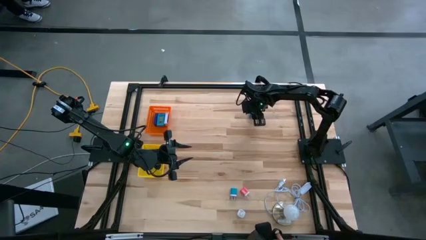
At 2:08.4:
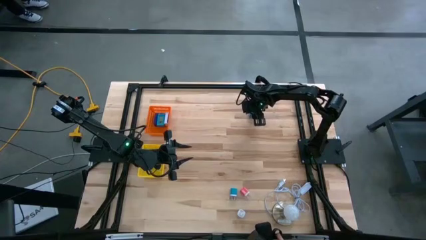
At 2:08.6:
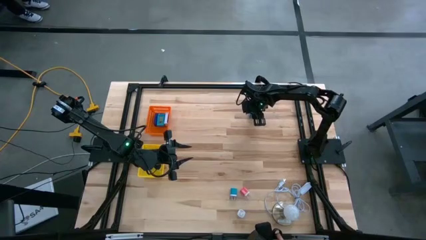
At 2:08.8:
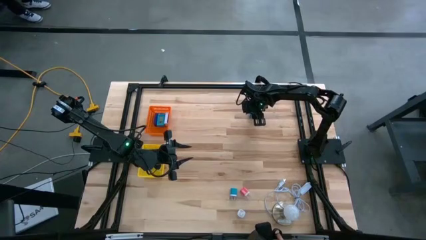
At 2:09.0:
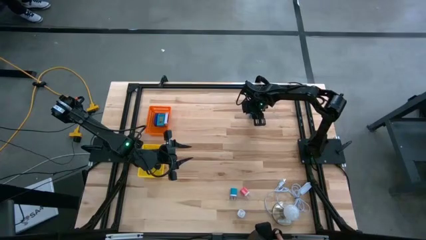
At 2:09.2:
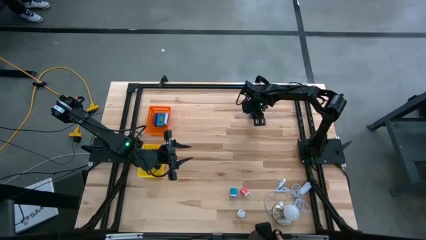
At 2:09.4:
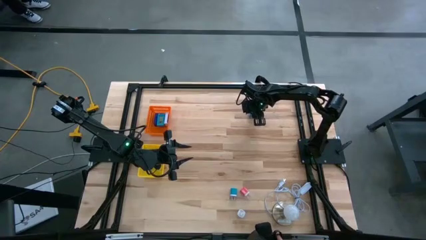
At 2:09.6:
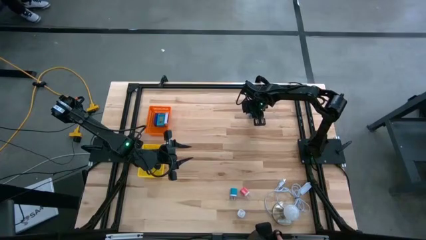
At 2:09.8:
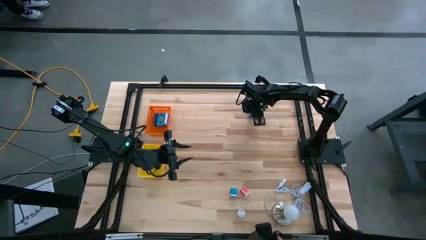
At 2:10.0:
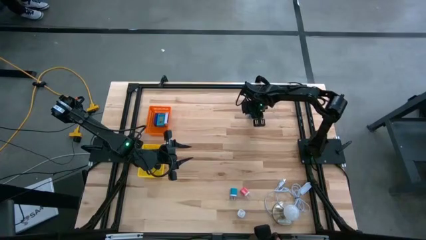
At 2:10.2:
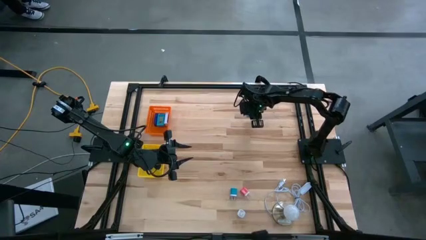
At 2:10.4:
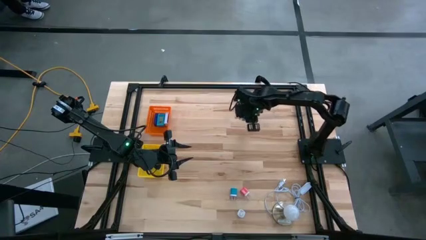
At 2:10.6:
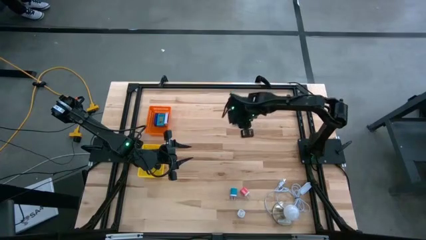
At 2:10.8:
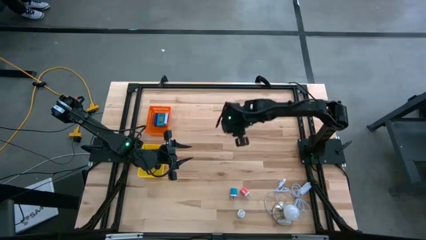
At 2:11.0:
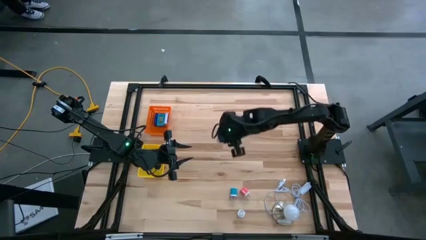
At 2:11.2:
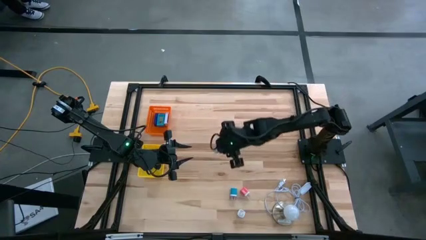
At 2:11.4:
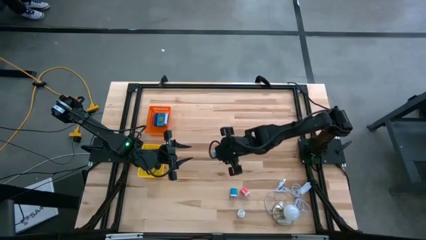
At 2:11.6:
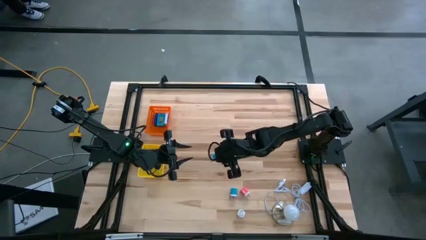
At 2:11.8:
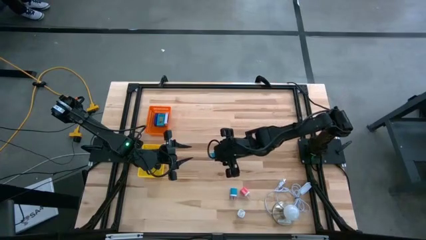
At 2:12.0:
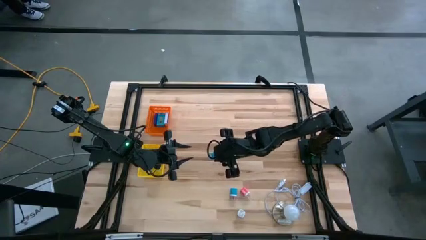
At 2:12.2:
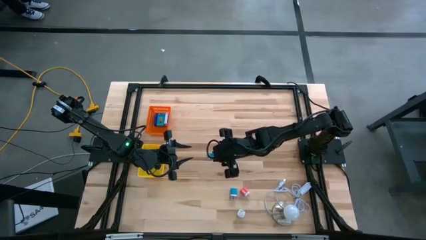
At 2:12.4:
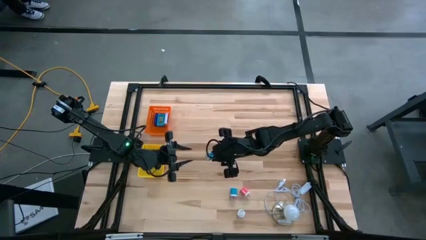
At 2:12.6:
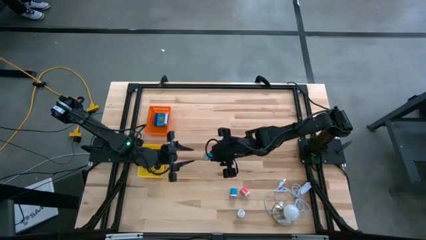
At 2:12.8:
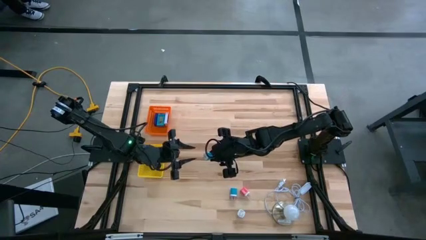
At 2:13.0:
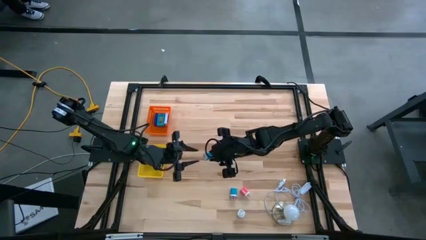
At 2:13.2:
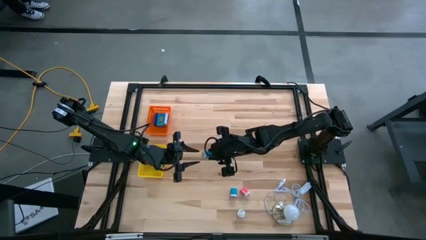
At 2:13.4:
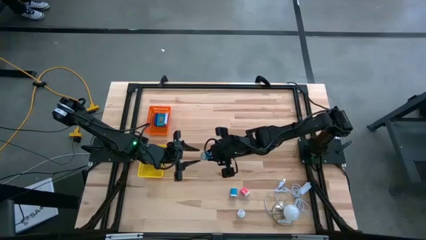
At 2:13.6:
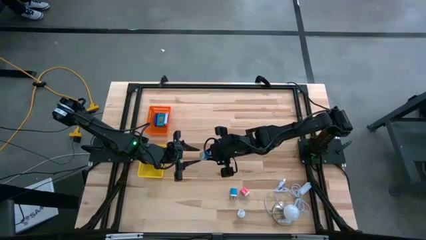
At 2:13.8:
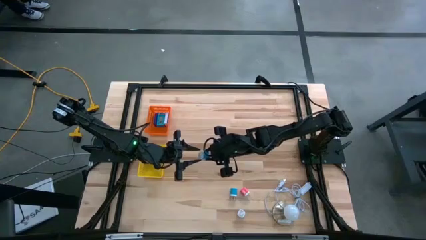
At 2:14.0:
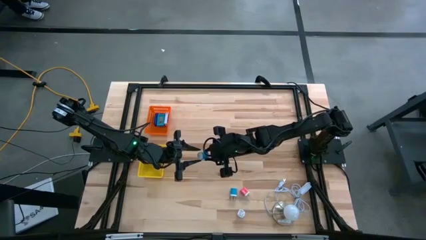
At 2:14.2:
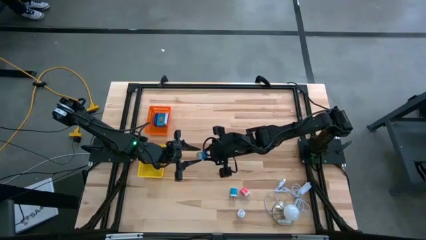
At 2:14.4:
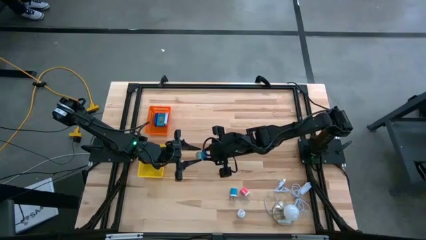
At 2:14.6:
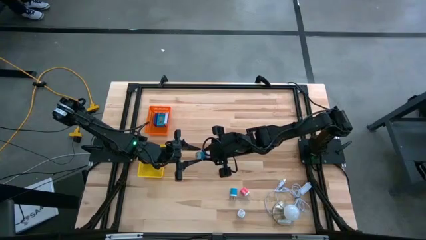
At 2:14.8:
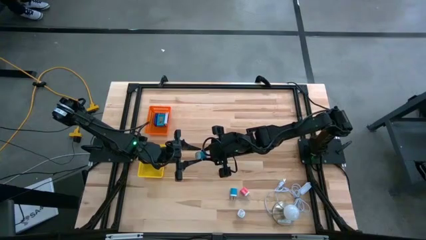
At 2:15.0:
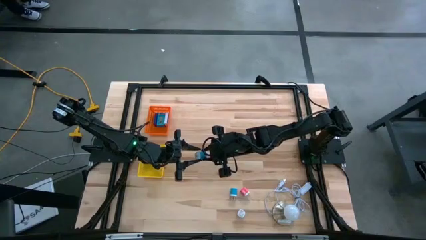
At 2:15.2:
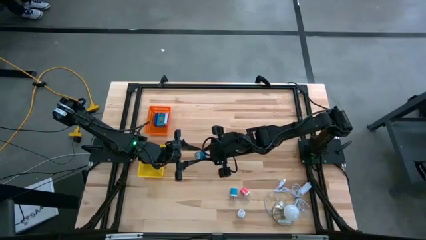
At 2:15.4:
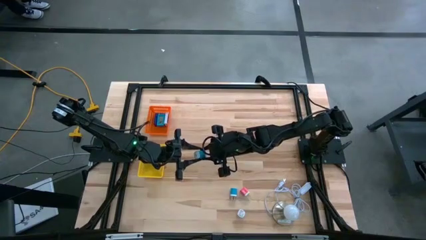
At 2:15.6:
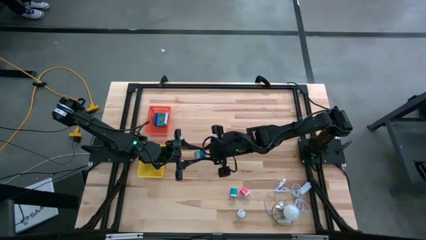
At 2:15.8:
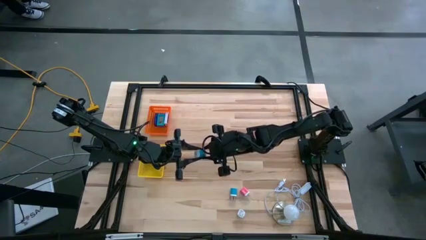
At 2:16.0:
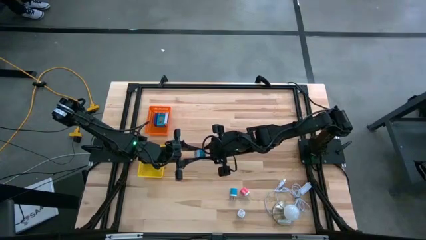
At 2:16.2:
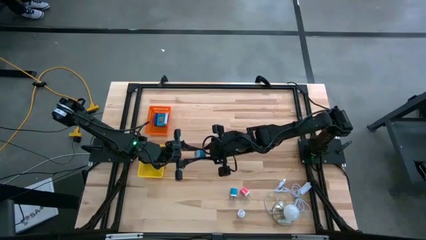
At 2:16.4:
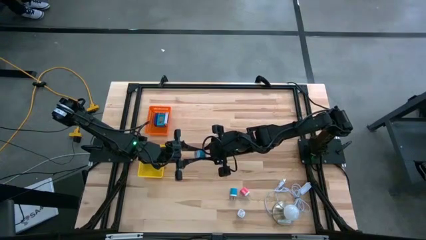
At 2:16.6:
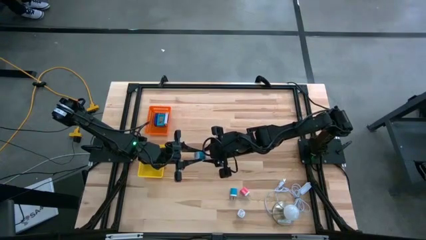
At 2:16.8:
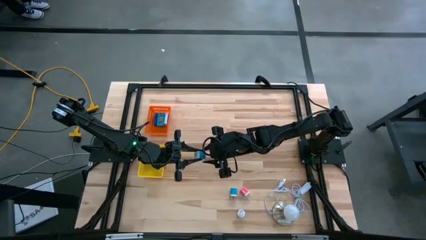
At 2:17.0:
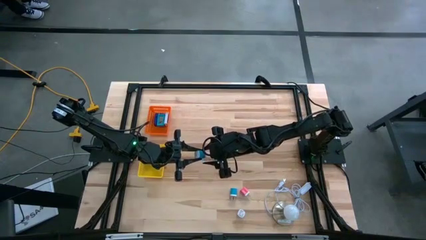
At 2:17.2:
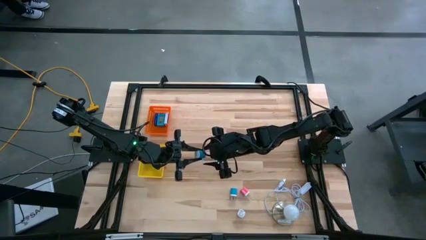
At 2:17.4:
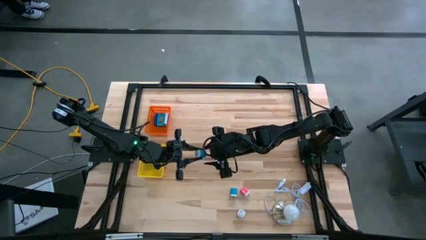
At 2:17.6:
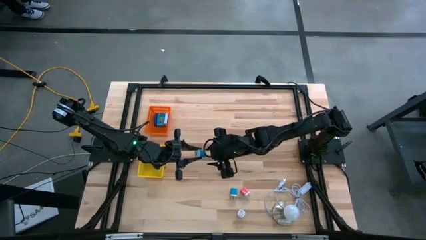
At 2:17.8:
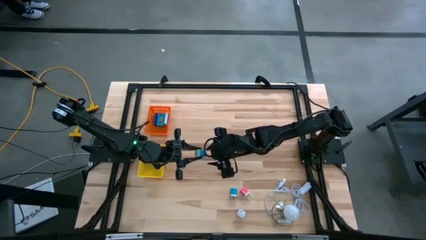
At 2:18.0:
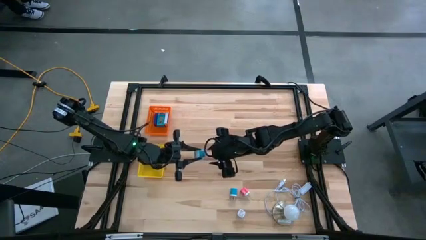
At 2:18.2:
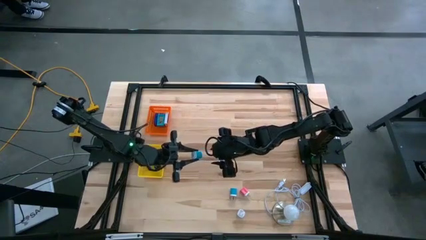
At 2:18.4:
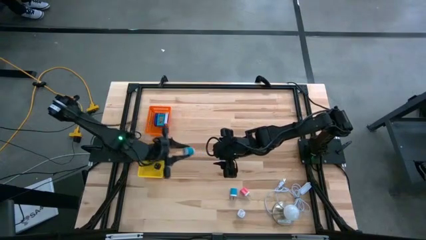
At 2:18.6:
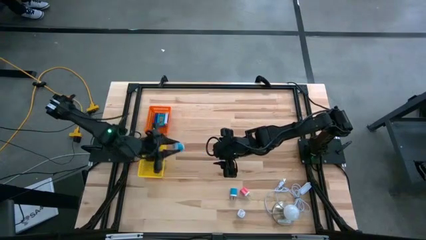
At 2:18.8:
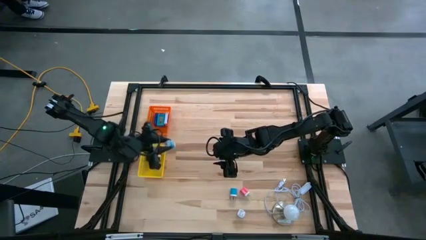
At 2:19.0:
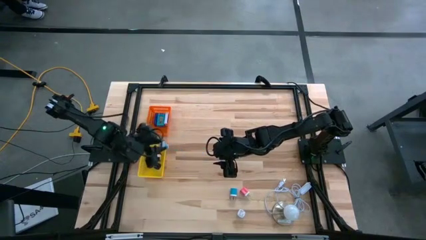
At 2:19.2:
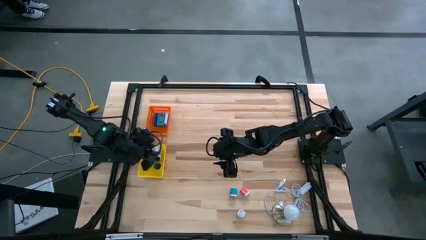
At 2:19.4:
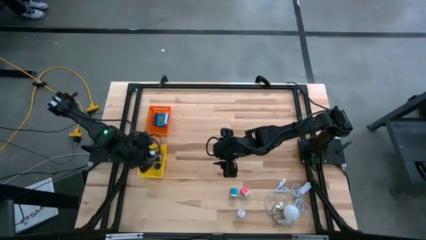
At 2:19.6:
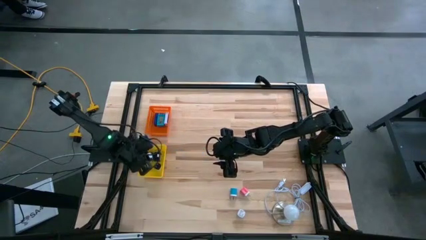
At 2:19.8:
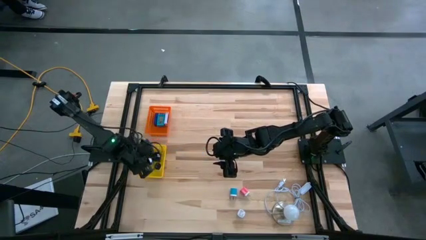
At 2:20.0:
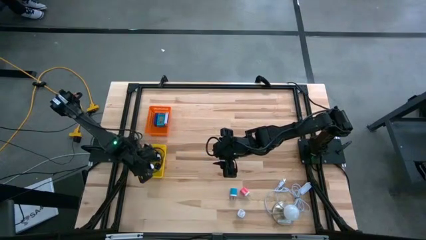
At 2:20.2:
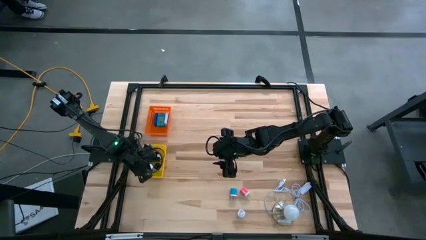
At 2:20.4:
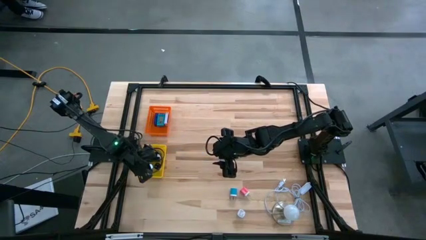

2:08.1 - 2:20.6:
Task: Pick & Place Office items
Put the top blue charger adapter into the yellow basket

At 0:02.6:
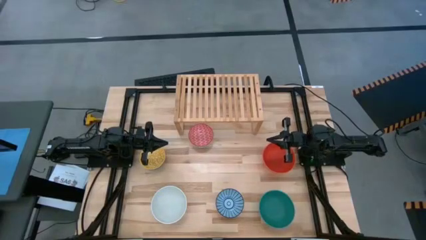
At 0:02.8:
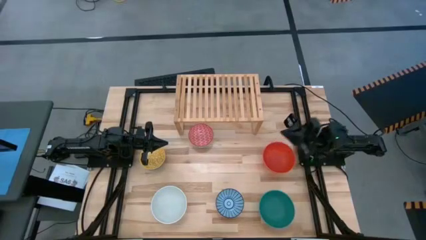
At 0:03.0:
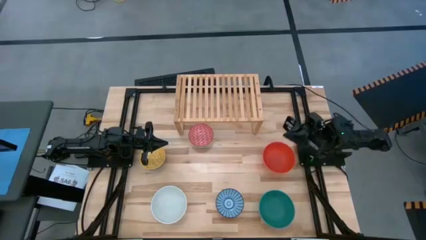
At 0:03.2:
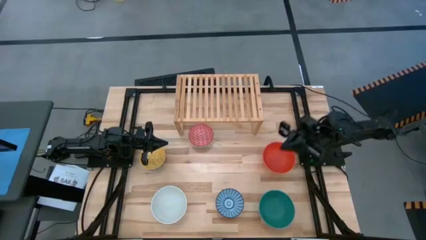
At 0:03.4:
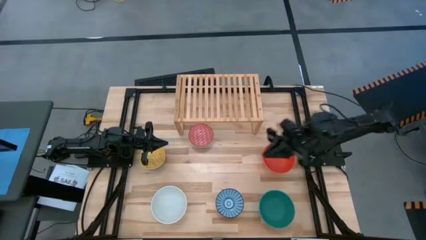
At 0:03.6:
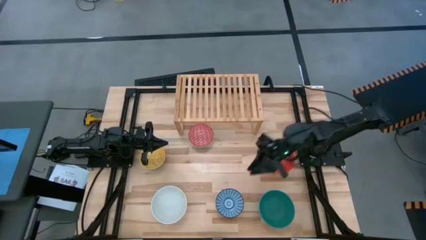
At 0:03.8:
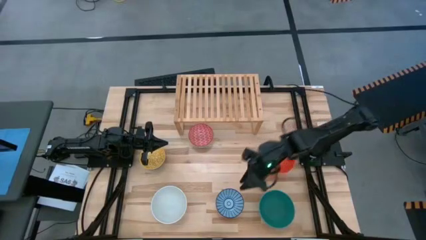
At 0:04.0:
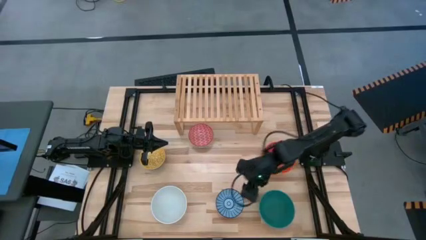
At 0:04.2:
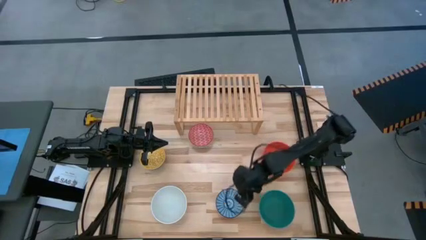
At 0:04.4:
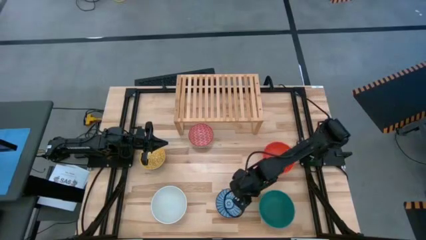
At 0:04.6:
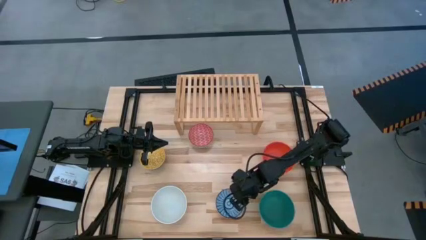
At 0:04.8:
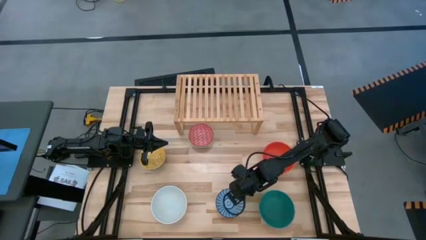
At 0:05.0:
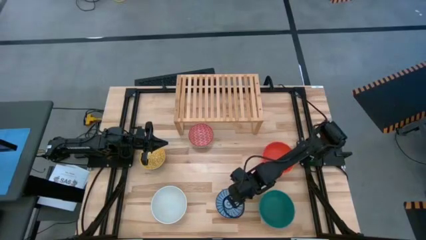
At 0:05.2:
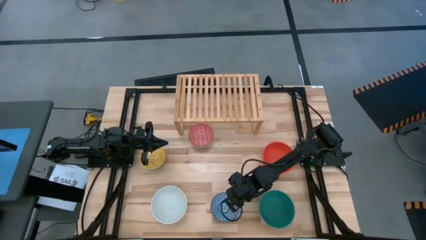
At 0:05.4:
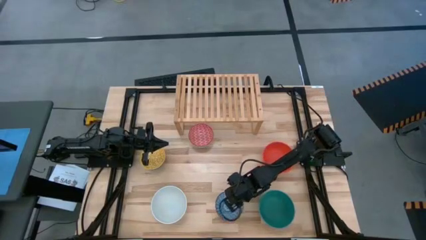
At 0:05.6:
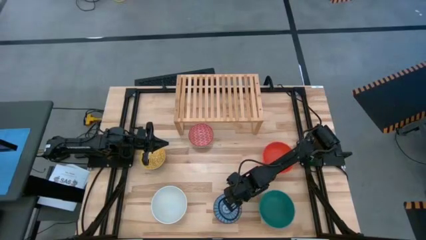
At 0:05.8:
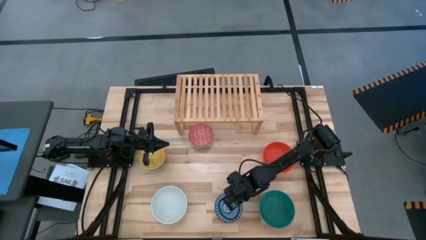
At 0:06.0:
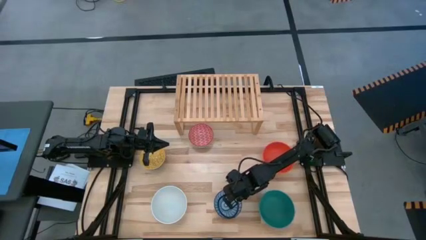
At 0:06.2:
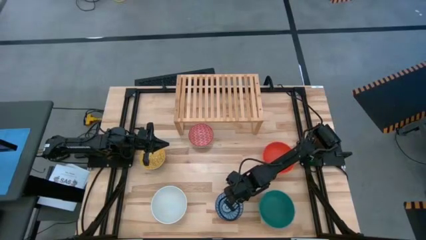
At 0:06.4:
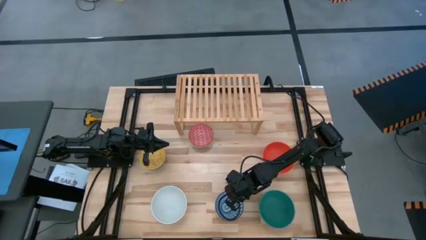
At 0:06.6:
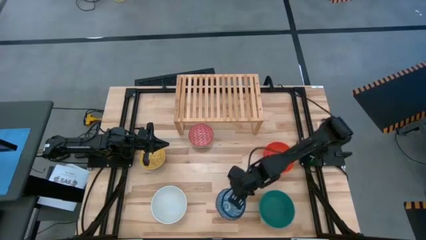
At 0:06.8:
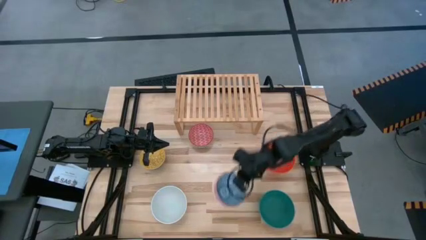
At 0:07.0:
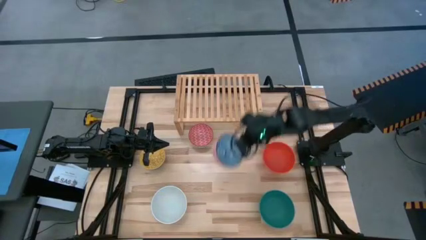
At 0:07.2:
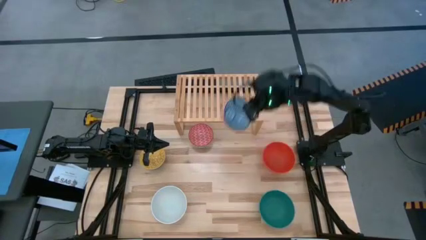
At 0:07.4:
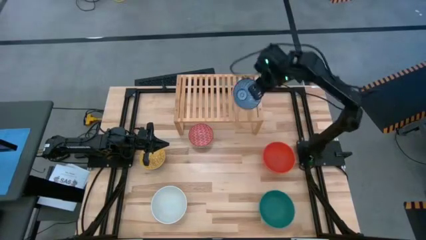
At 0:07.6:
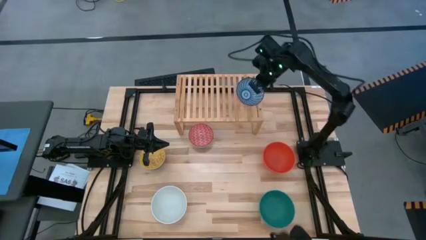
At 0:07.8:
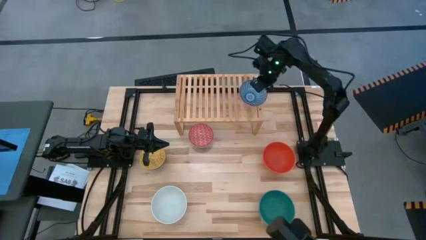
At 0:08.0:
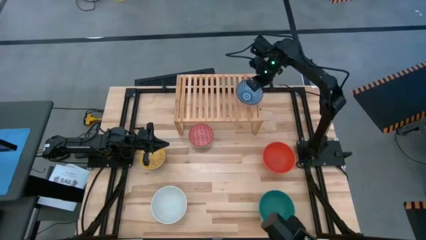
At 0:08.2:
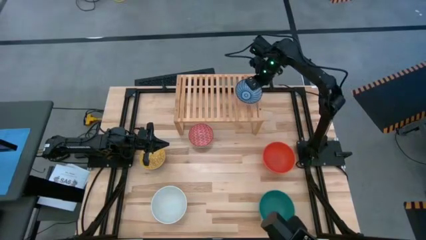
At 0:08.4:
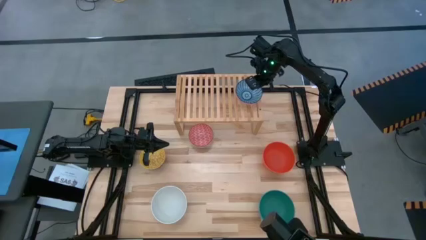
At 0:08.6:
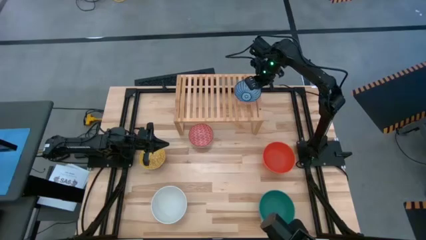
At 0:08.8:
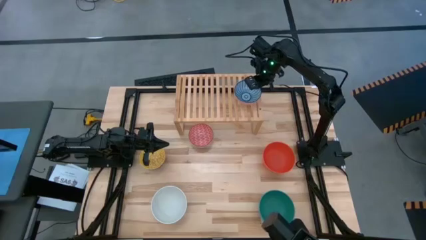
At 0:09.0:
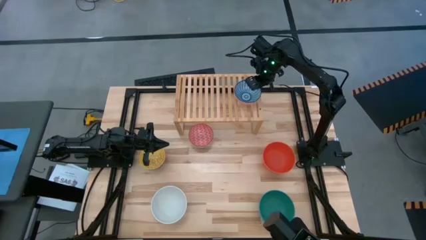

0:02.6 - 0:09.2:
Task: Place and stack bowls onto a shelf
Put the small blue bowl on the shelf
